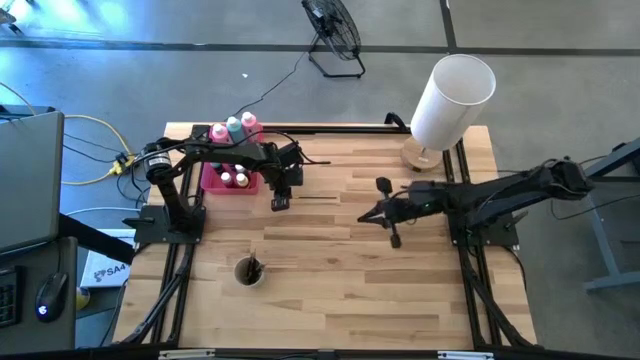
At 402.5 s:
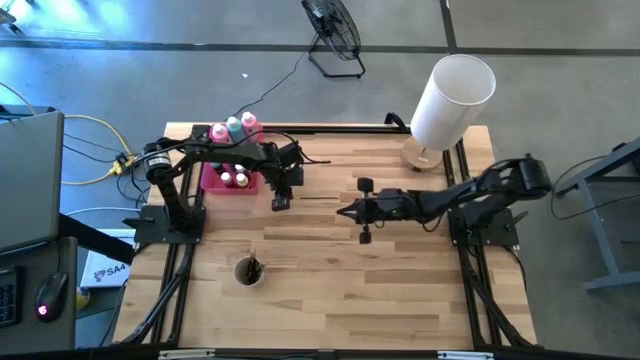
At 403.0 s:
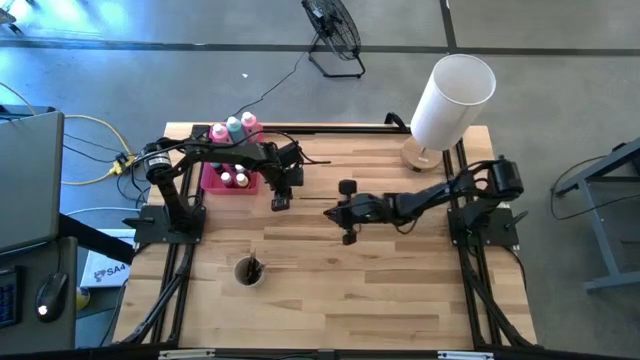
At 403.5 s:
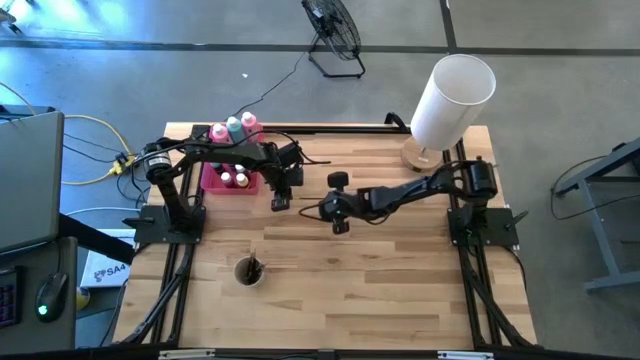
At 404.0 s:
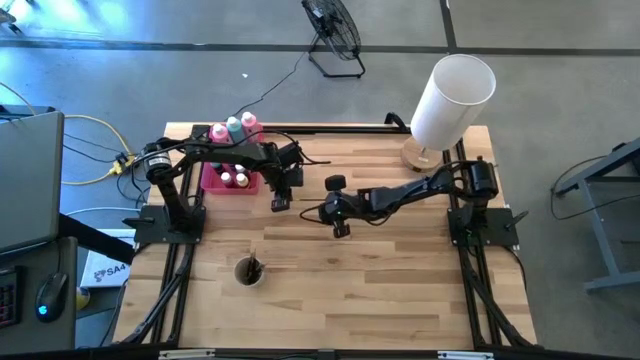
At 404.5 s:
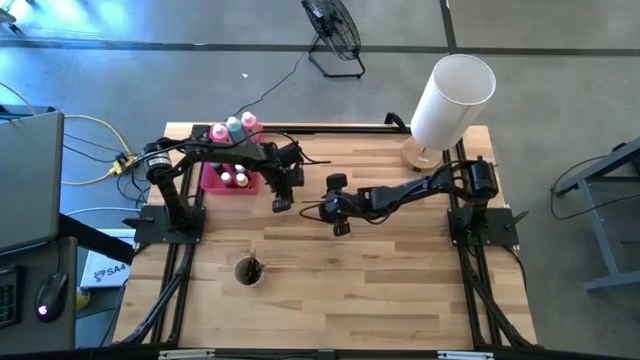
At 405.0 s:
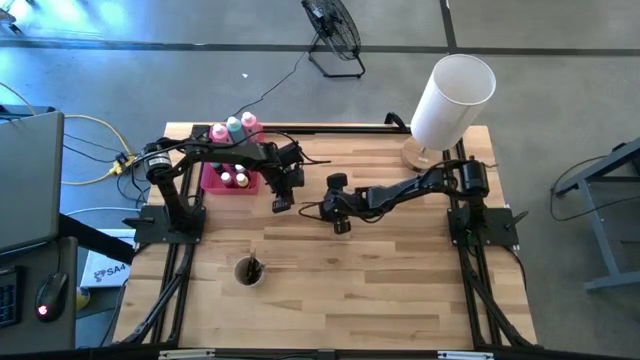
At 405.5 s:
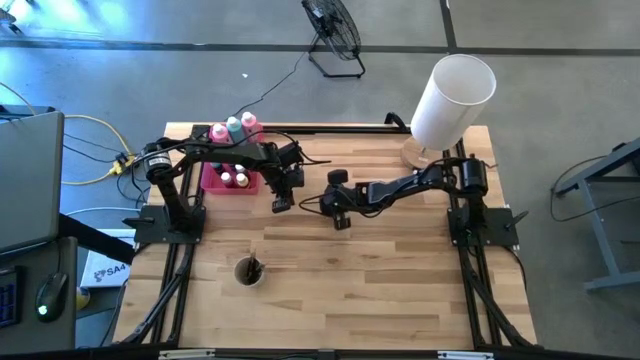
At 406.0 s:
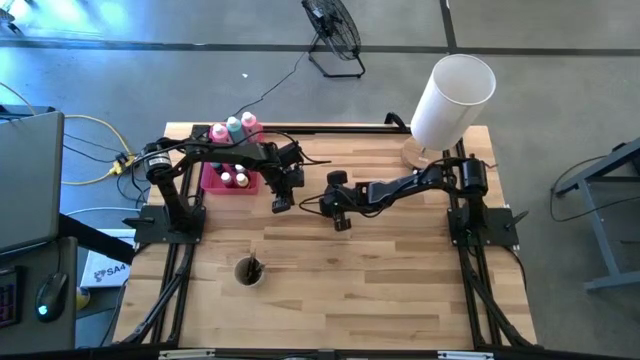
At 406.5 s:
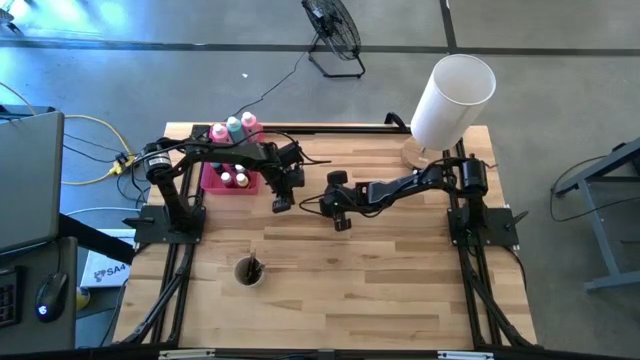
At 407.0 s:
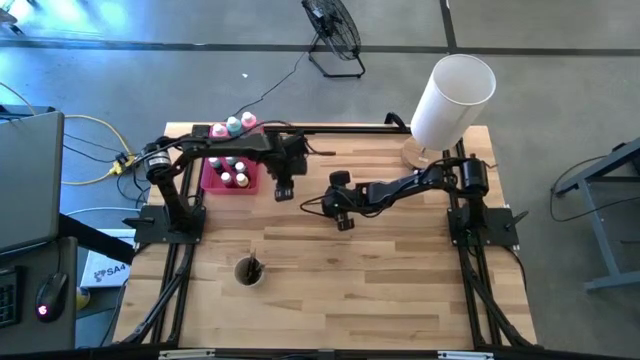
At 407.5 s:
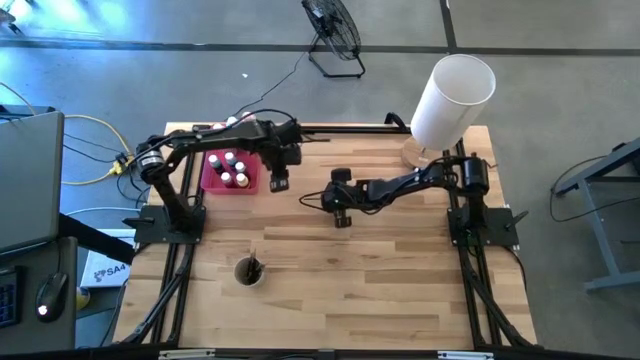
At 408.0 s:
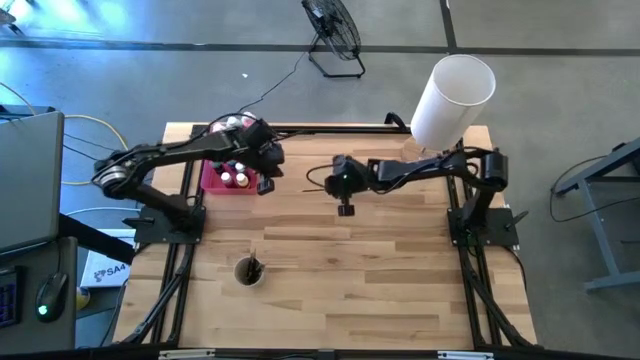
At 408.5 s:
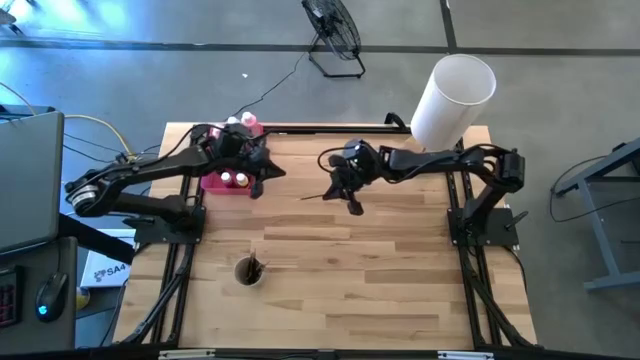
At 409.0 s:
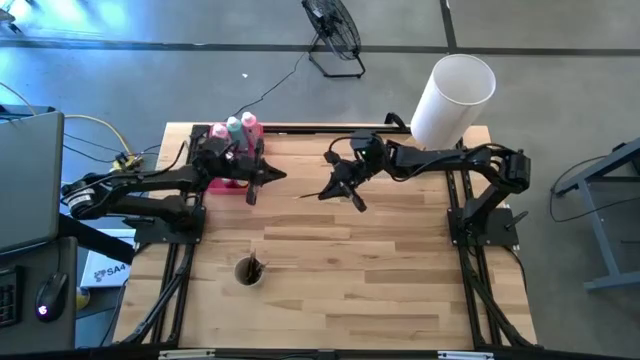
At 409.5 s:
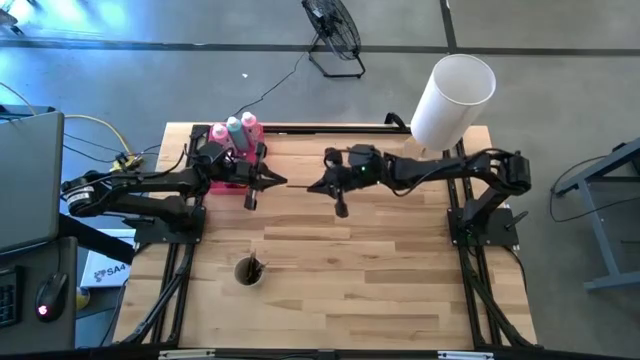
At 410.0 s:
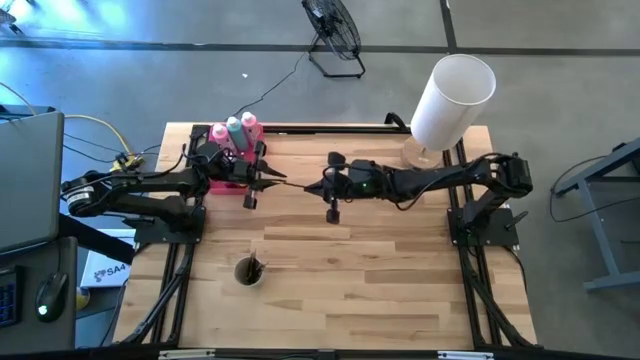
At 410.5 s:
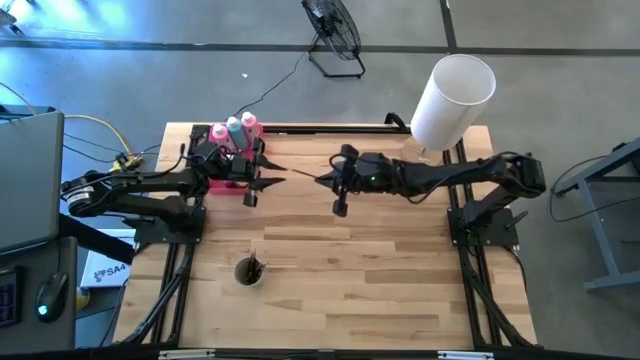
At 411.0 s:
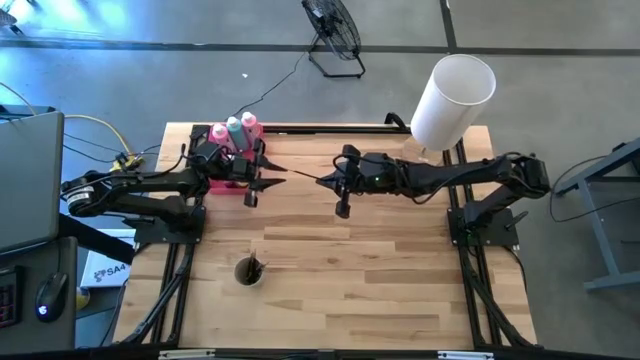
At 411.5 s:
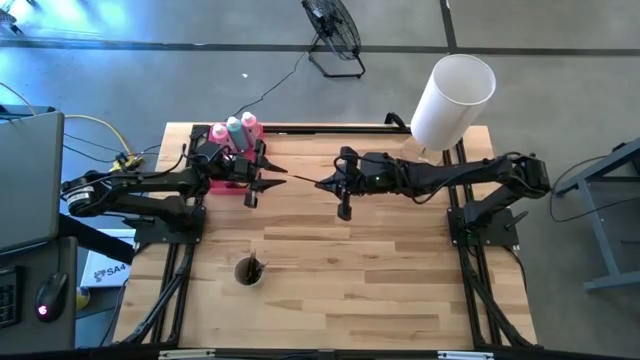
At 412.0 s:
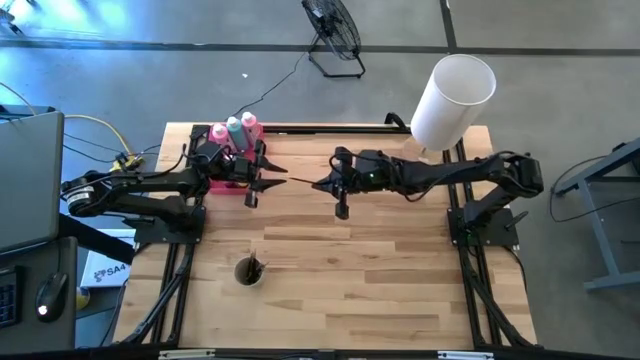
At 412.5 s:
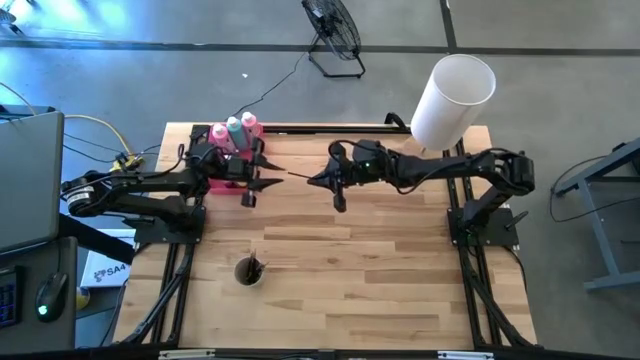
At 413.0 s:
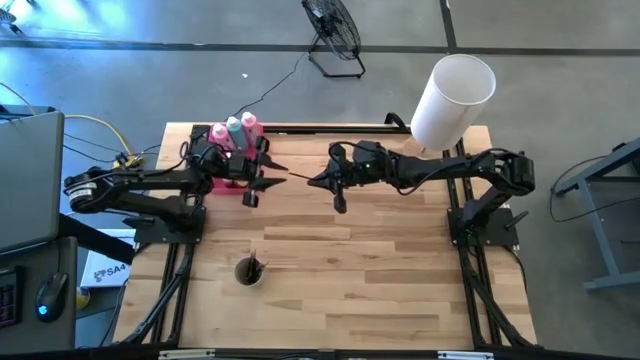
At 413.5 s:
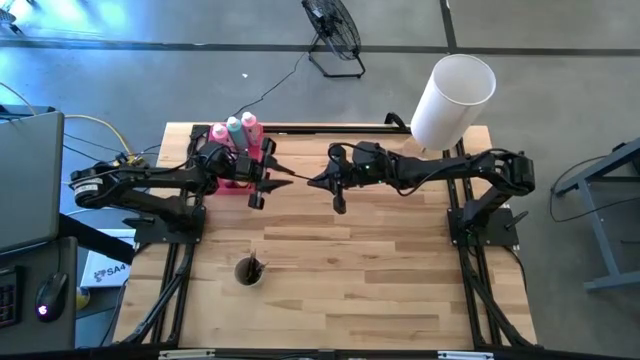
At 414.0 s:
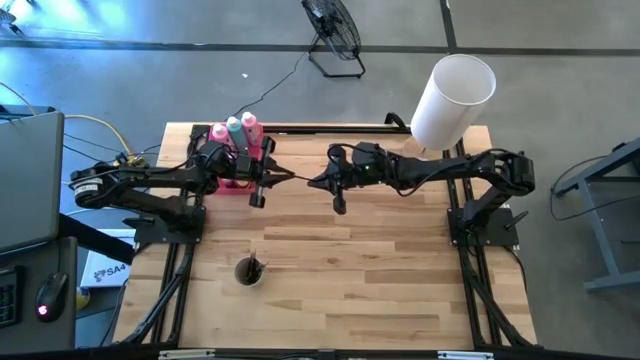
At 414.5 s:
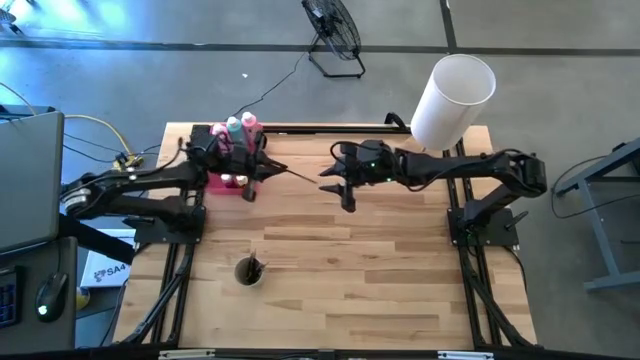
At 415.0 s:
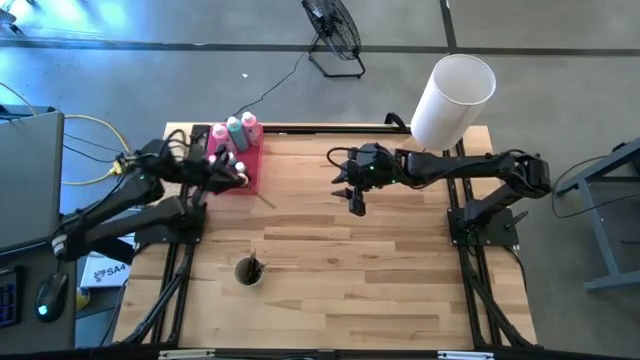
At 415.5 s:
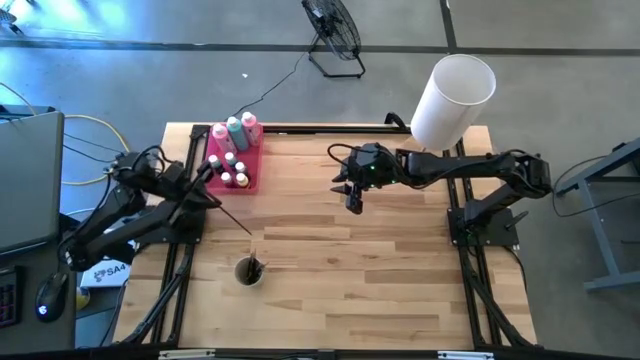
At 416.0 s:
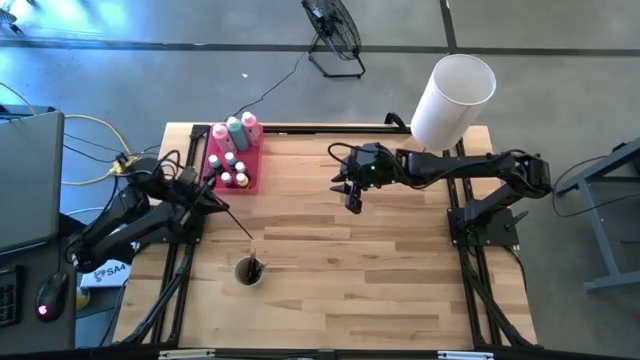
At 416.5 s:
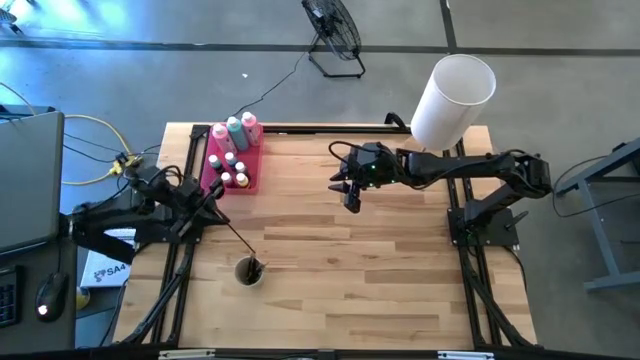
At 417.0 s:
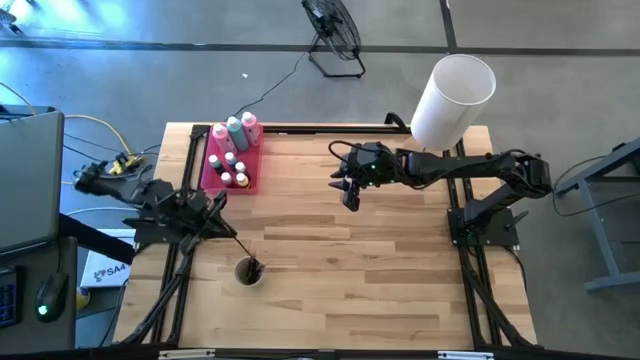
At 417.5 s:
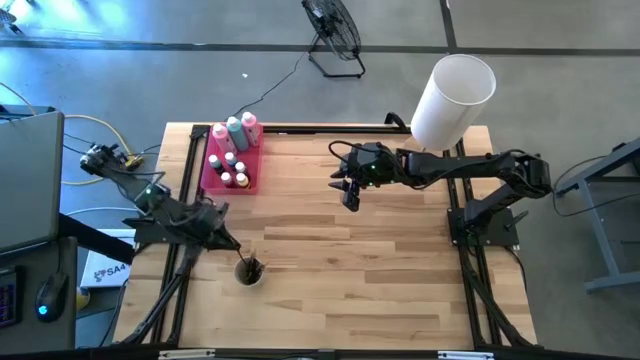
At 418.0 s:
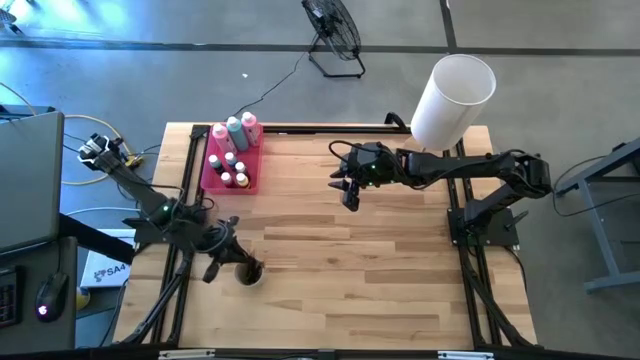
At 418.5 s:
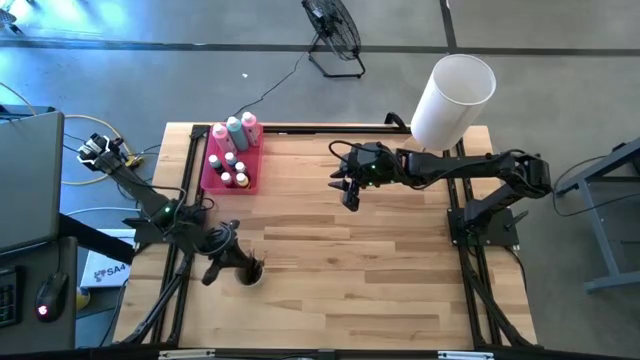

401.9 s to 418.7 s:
Task: Pick & Place Paint Supplies
Put the gold paintbrush into the light brown cup
